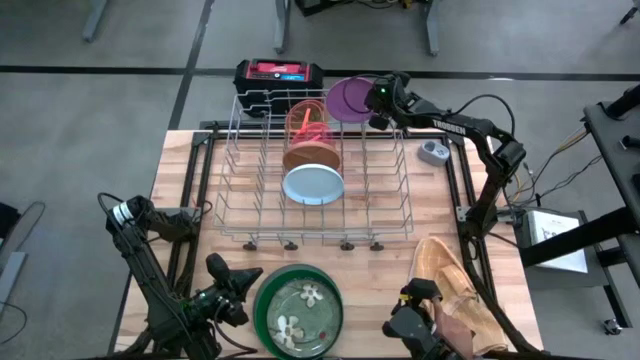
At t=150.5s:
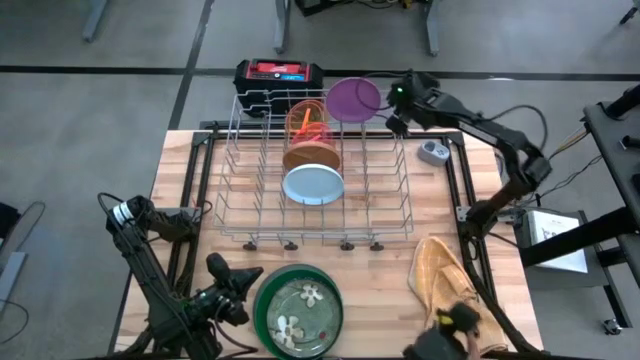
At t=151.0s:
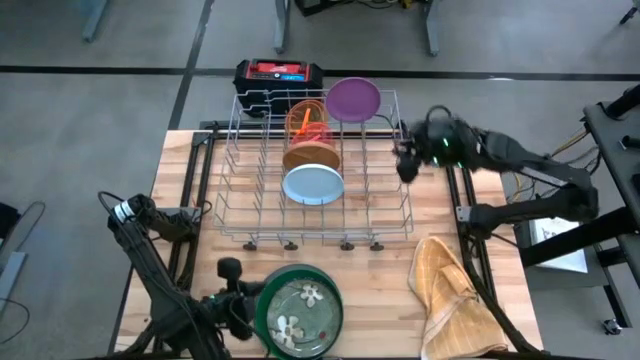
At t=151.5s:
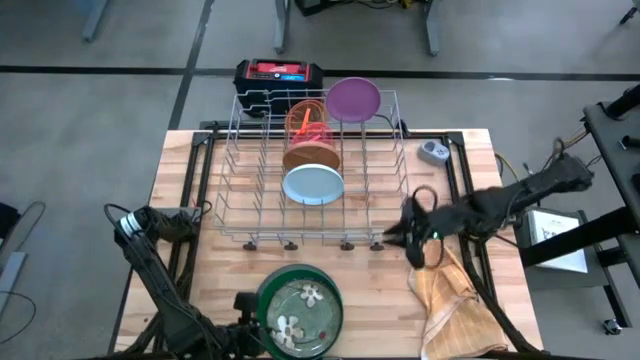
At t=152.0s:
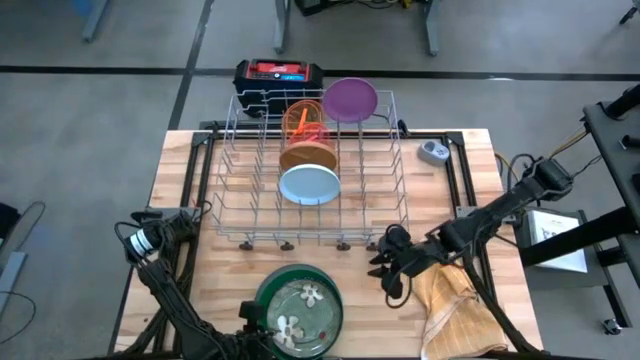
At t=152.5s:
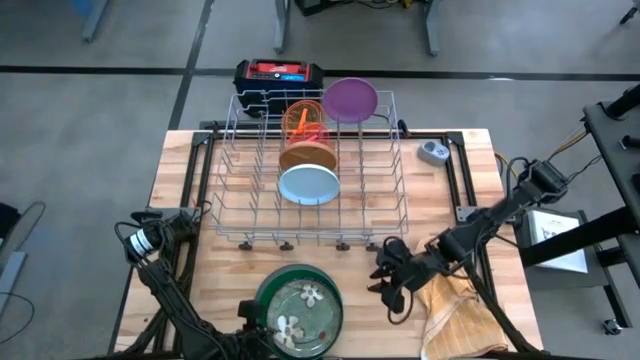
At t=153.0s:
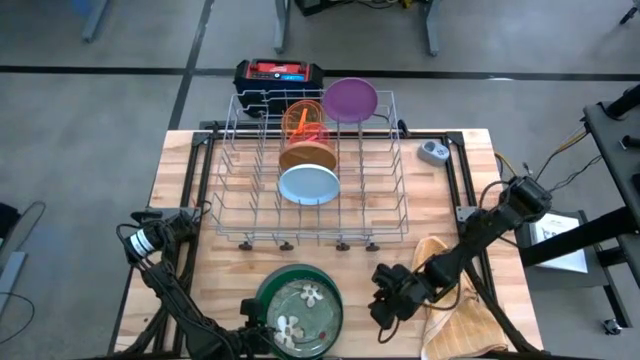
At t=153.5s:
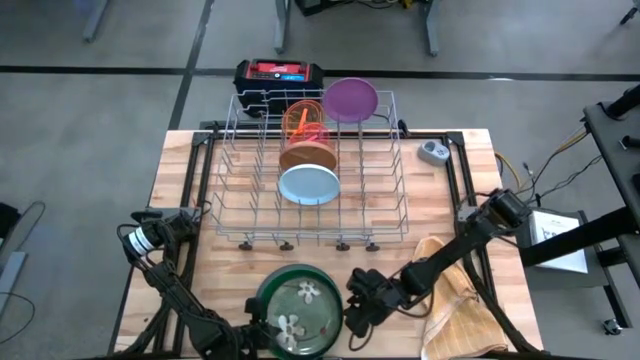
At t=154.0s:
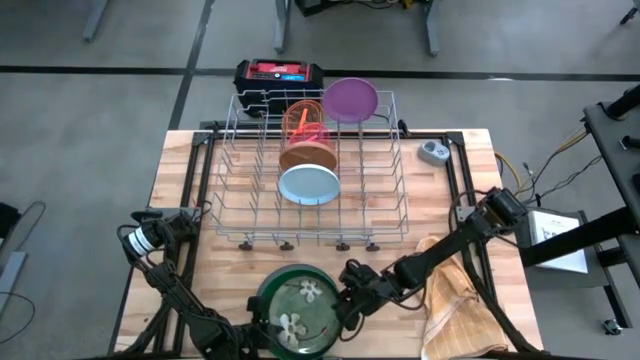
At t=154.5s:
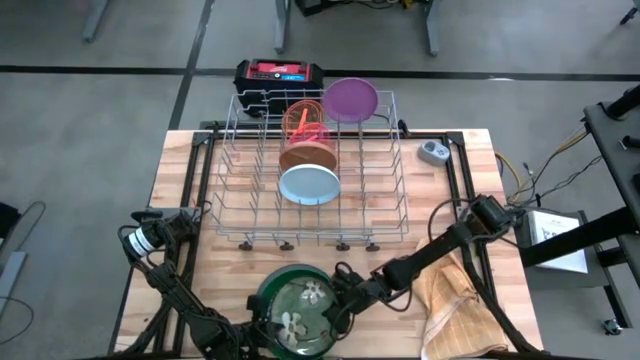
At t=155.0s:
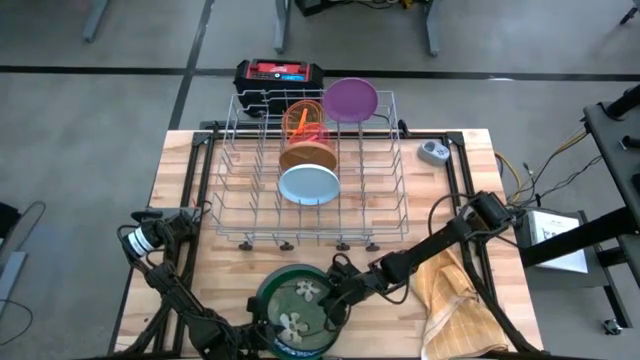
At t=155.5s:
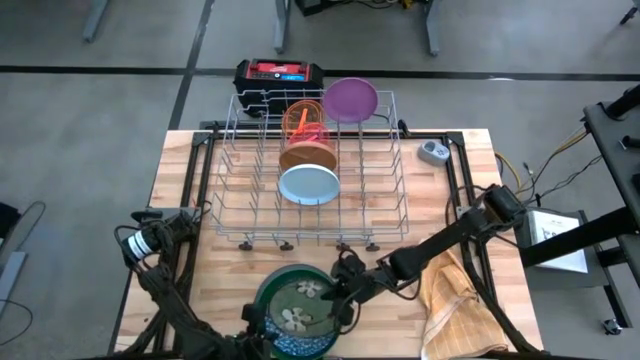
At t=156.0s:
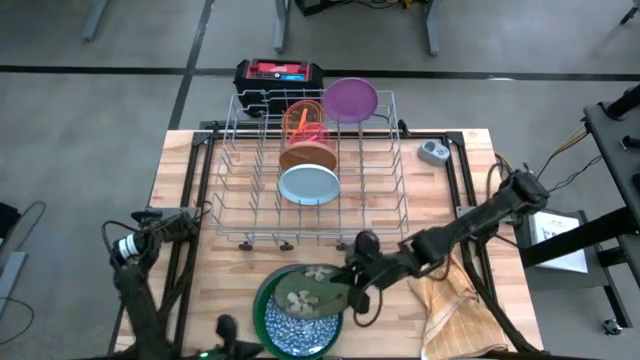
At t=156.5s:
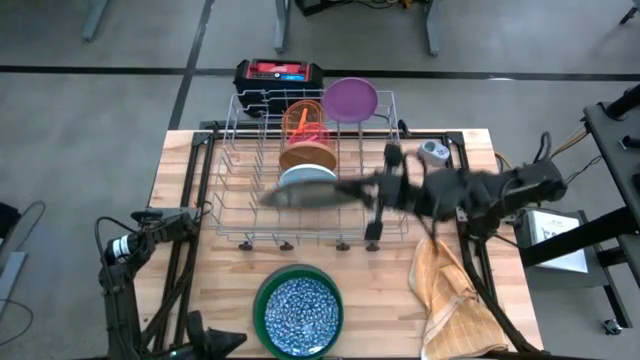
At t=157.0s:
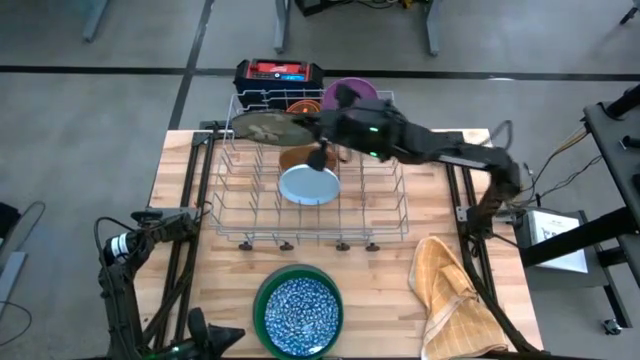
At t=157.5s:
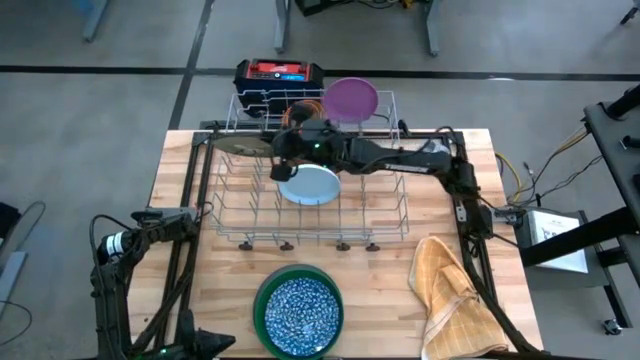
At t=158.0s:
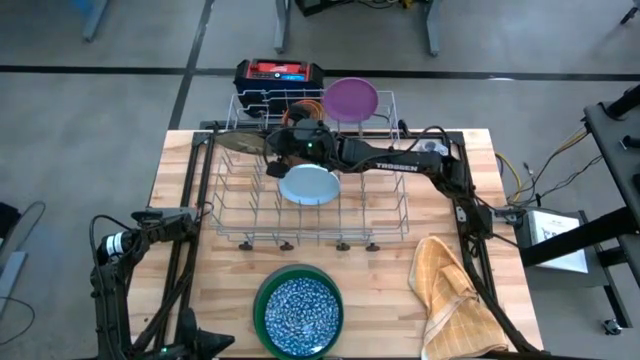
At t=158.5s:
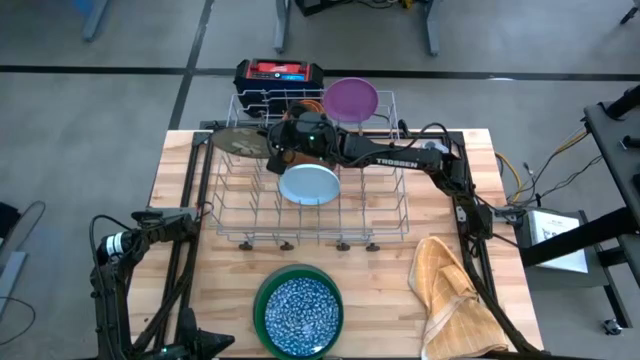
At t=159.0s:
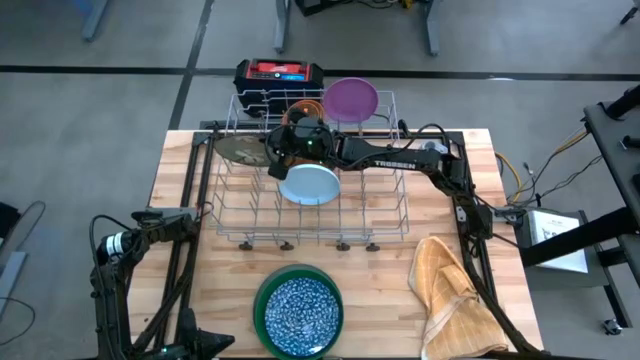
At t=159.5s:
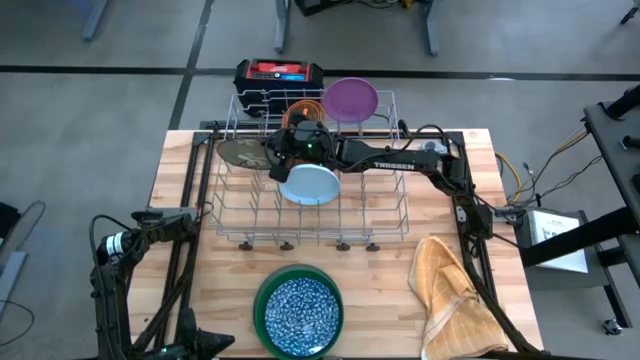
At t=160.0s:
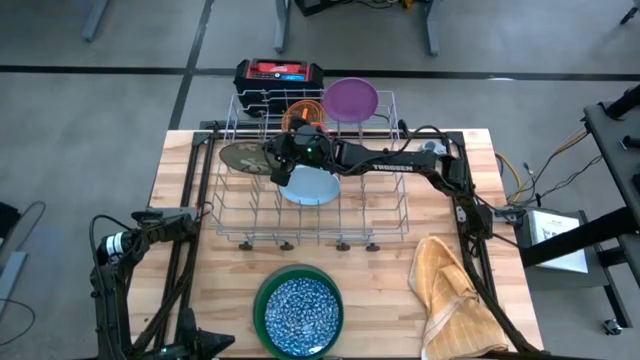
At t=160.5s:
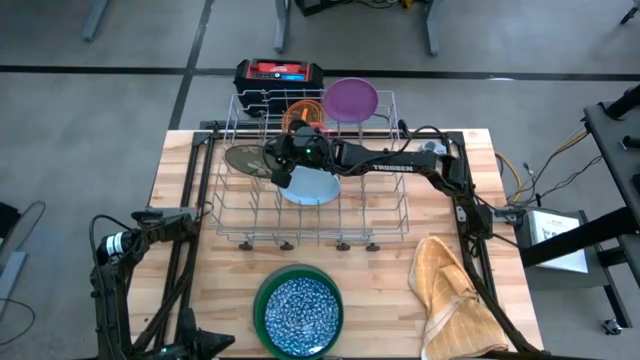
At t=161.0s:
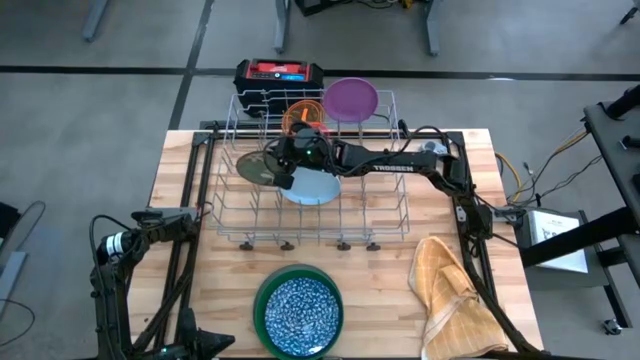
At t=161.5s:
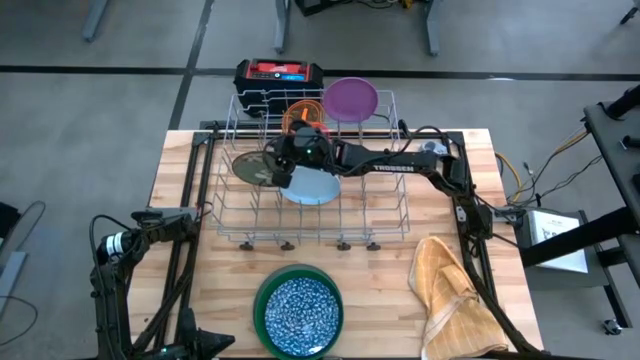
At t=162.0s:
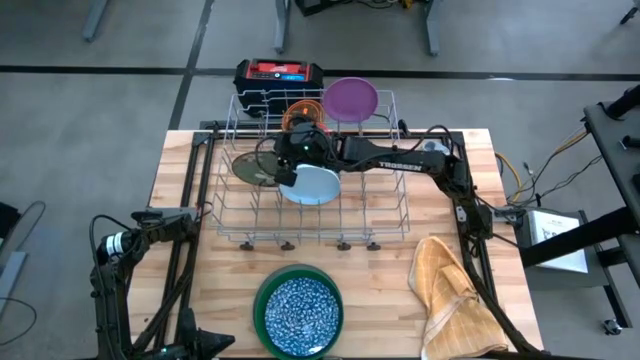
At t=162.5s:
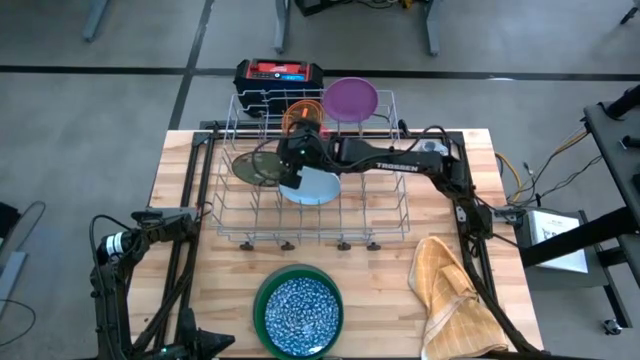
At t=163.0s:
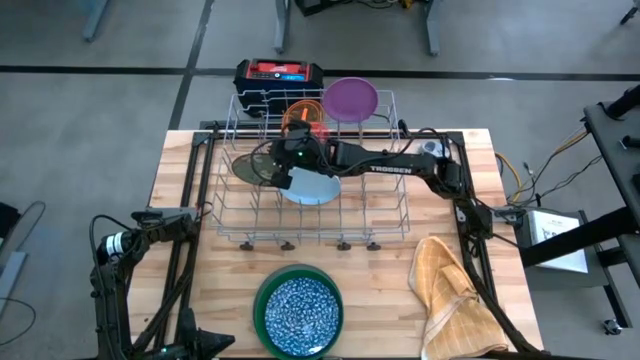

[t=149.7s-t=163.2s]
Task: Sort dishes
Put the green patterned plate into the dish rack

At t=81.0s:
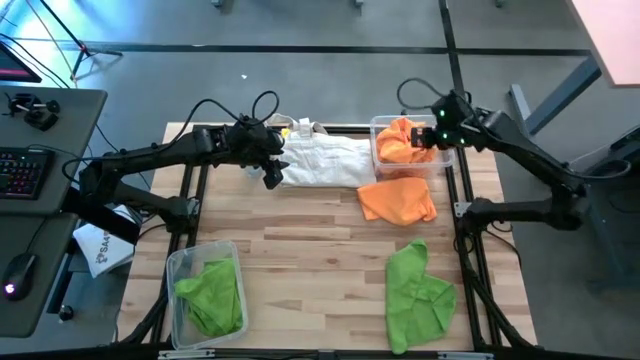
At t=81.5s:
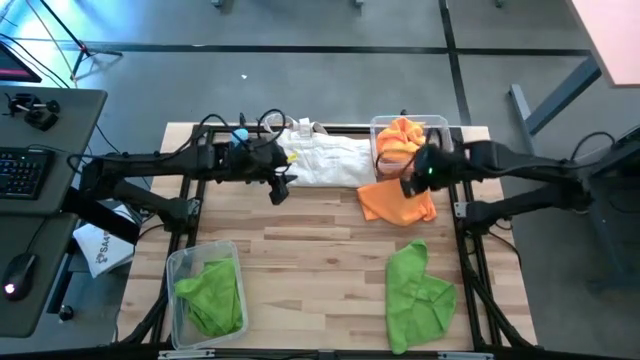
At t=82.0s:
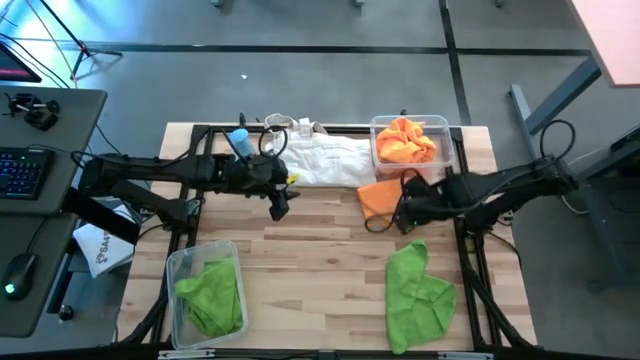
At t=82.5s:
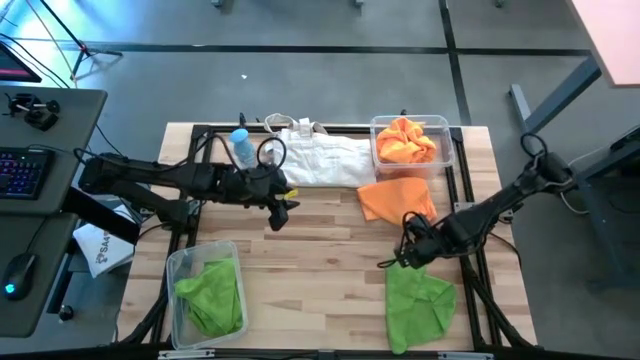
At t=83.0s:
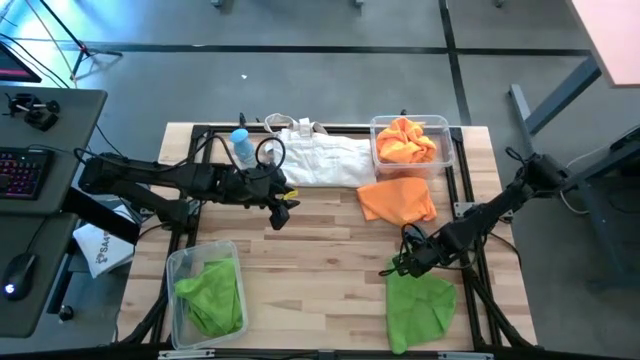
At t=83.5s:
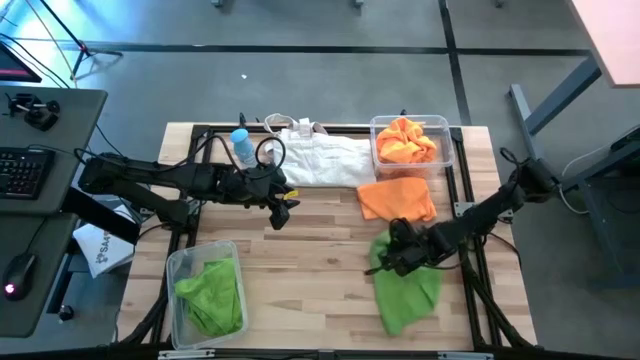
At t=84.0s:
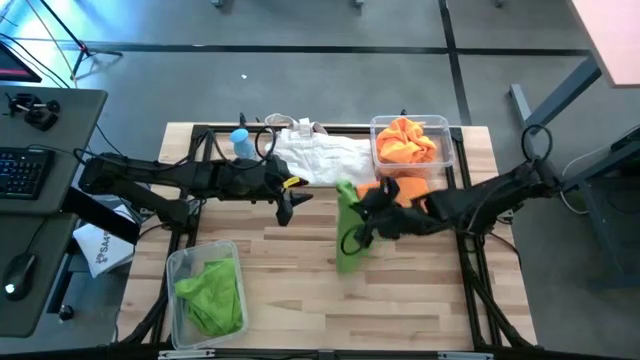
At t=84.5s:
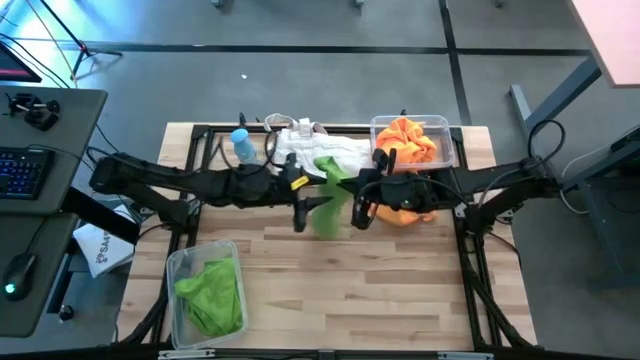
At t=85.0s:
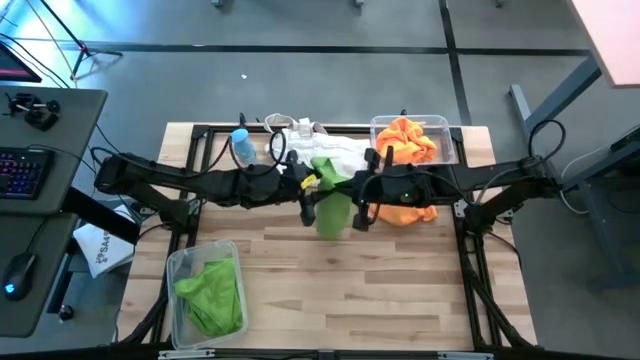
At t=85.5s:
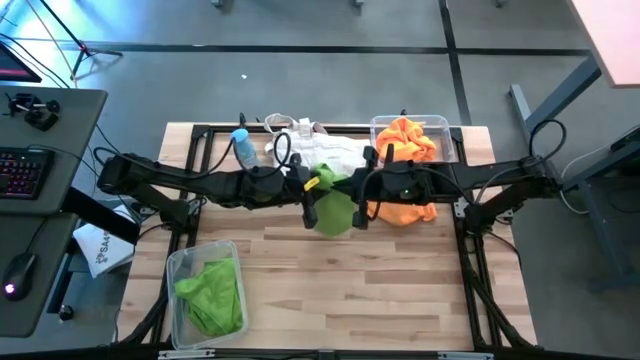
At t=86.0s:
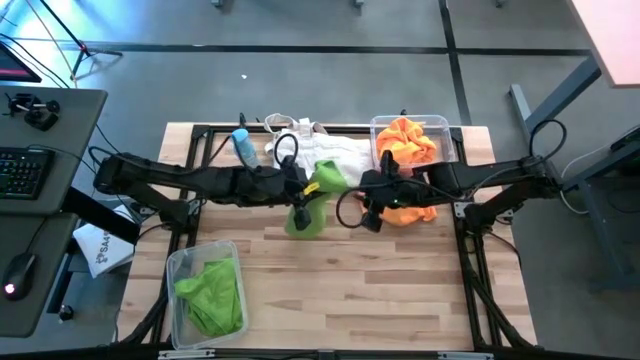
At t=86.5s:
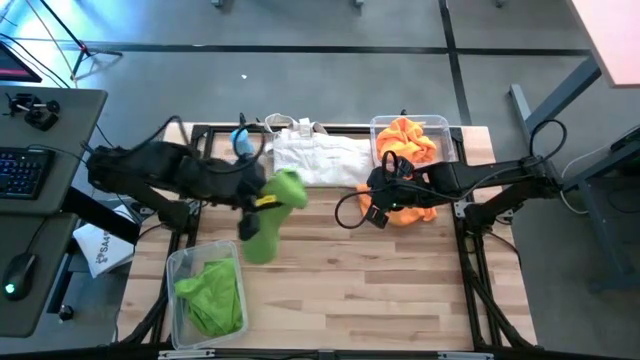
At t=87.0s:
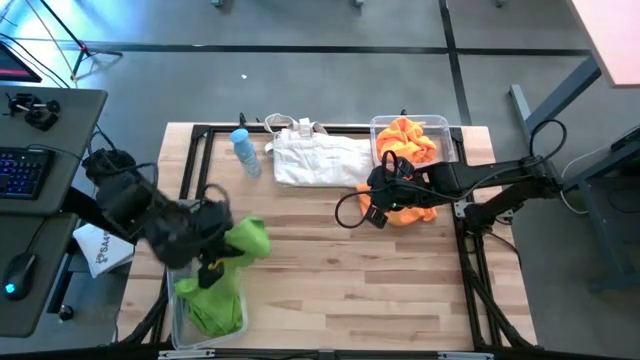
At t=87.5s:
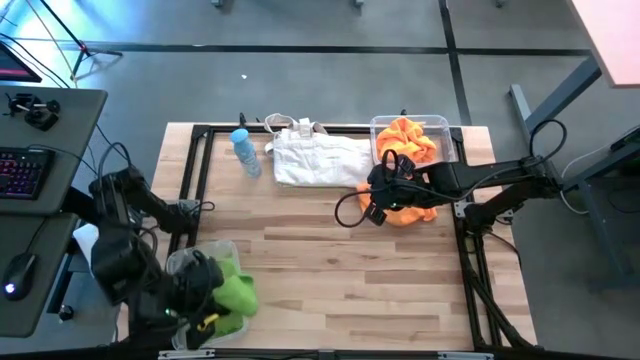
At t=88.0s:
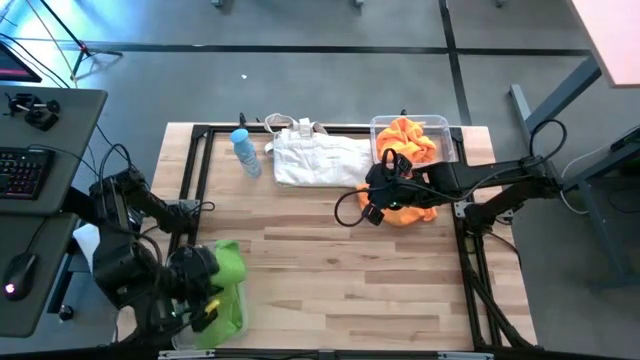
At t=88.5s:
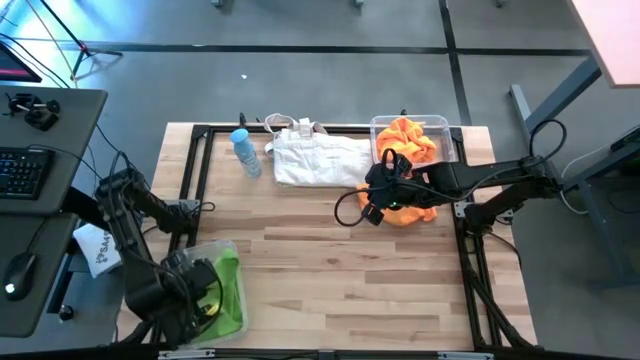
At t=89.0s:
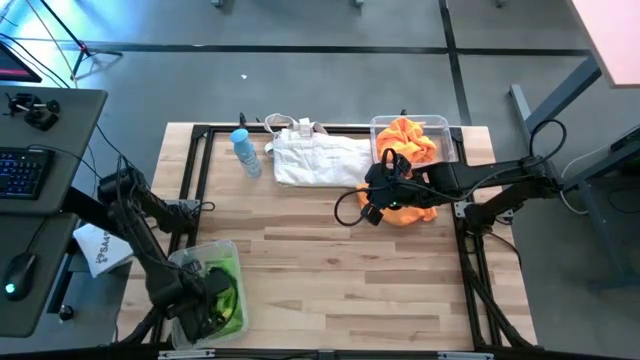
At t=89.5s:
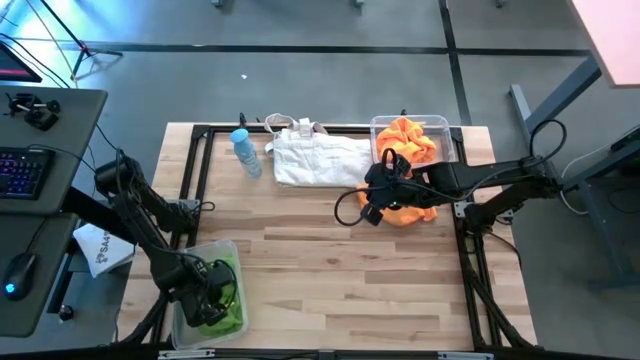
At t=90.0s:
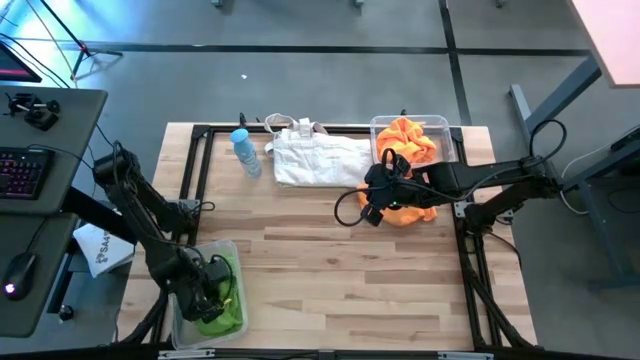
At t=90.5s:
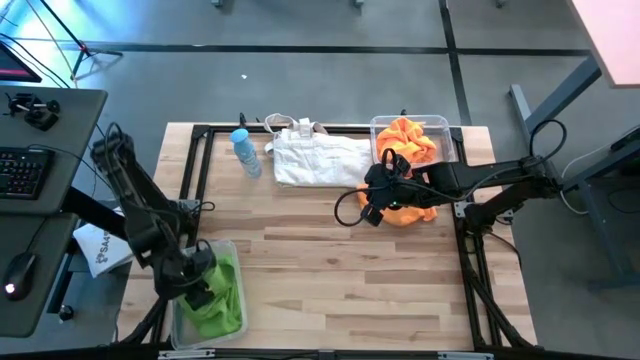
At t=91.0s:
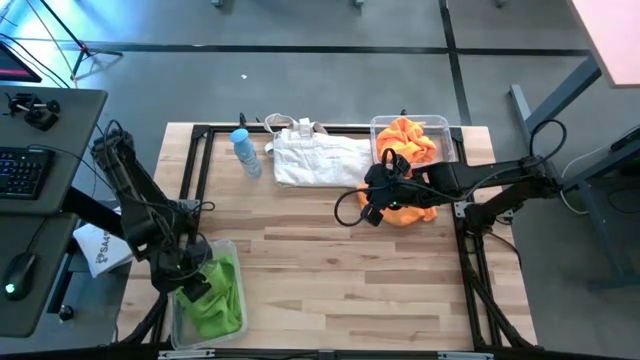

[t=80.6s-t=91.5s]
Task: Sort microfiber towel by color & place in baskets
Put the green microfiber cloth into the bottom transparent bin
